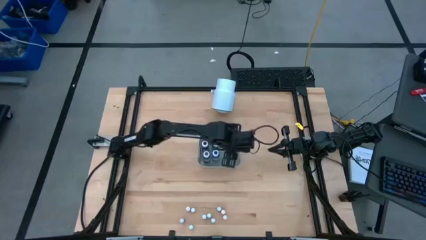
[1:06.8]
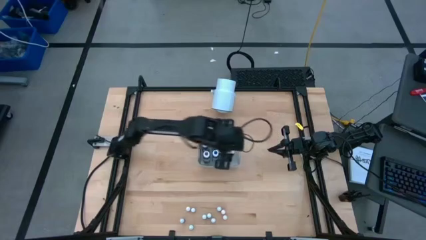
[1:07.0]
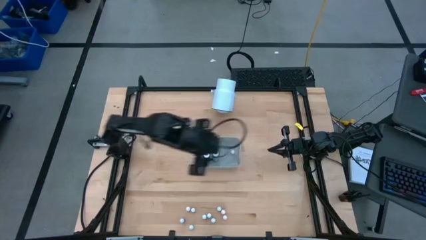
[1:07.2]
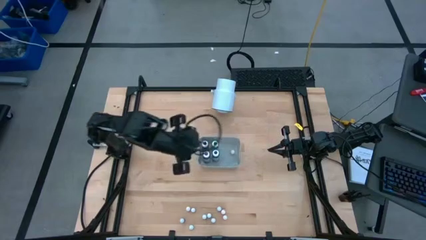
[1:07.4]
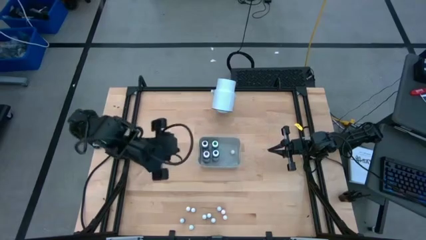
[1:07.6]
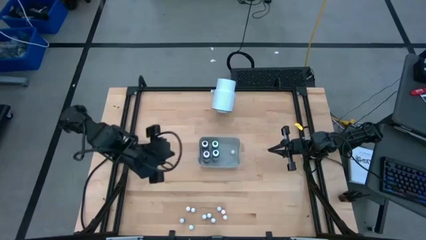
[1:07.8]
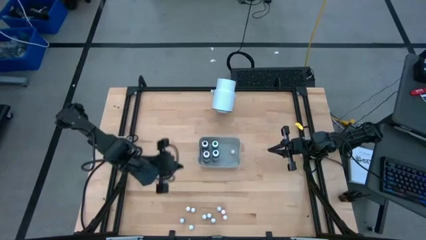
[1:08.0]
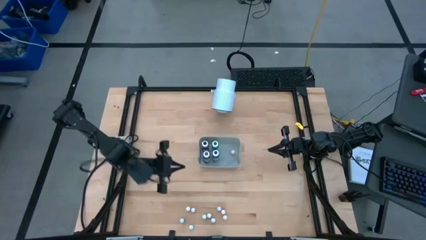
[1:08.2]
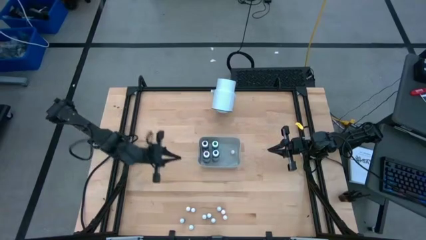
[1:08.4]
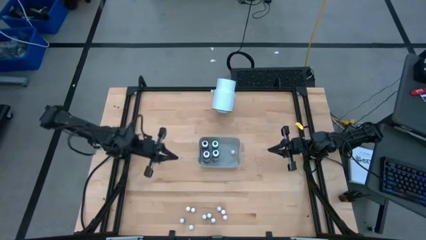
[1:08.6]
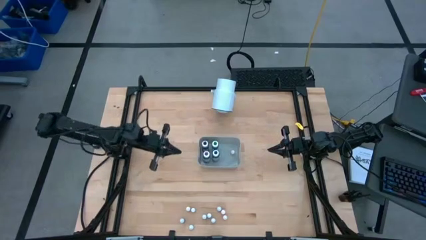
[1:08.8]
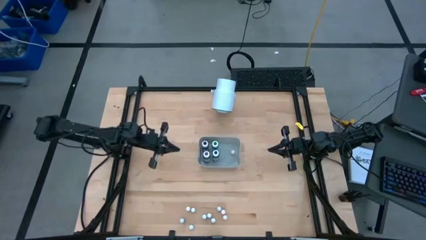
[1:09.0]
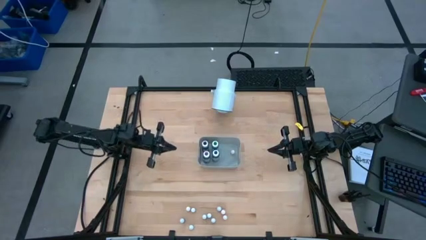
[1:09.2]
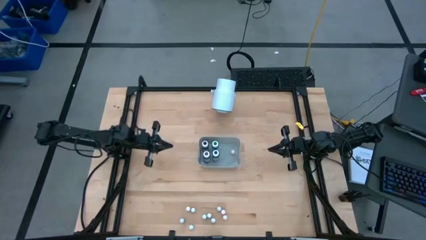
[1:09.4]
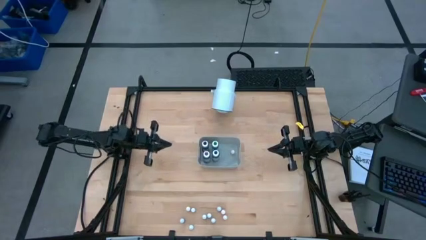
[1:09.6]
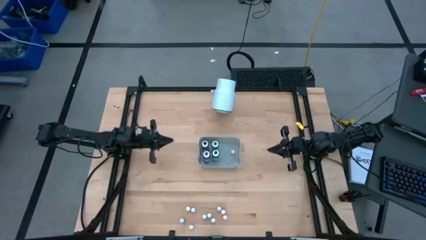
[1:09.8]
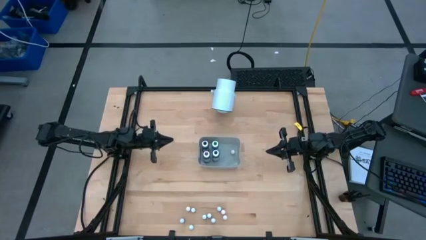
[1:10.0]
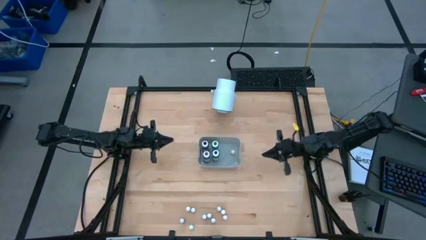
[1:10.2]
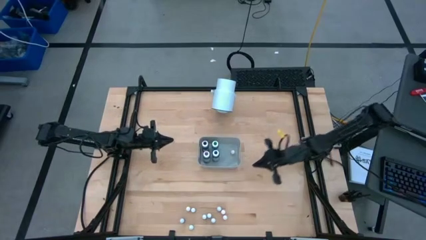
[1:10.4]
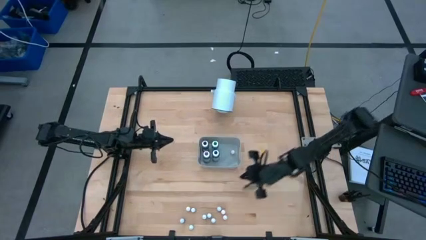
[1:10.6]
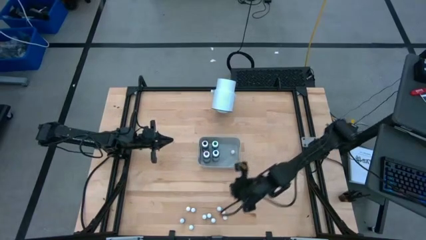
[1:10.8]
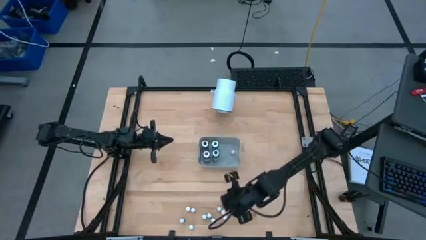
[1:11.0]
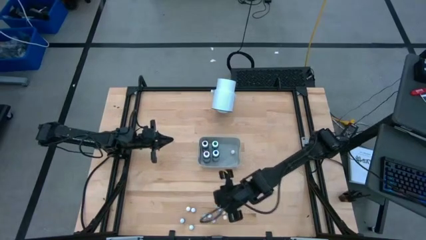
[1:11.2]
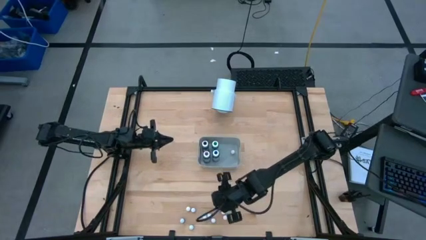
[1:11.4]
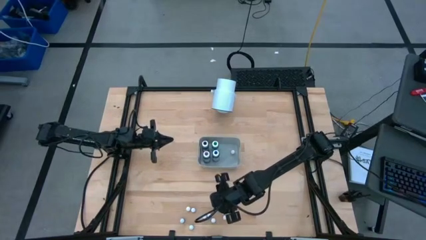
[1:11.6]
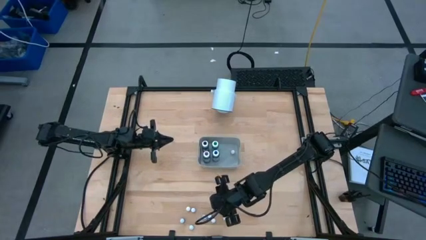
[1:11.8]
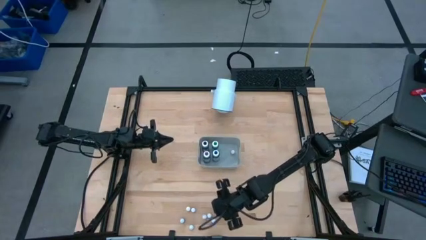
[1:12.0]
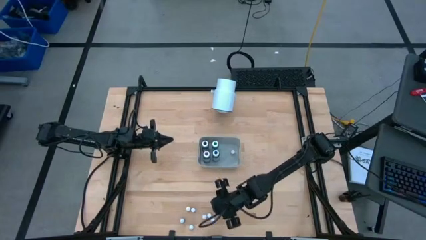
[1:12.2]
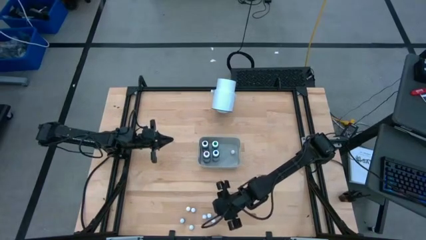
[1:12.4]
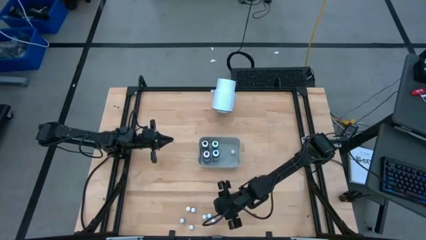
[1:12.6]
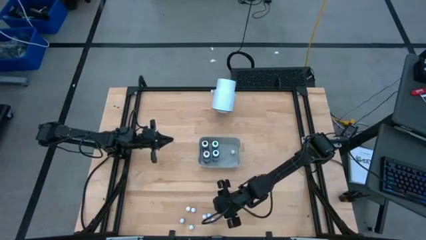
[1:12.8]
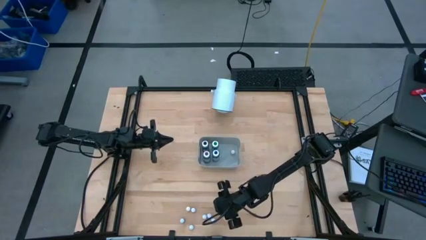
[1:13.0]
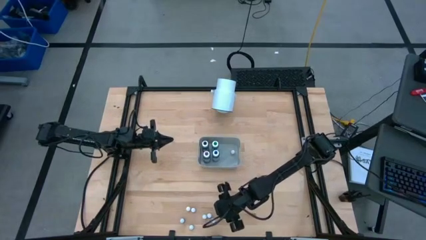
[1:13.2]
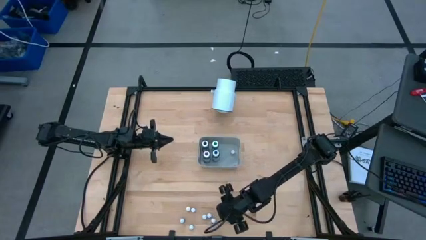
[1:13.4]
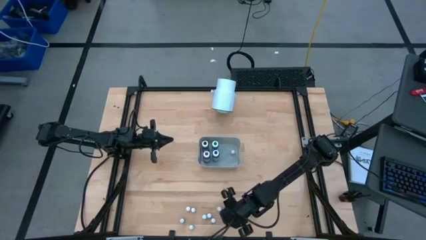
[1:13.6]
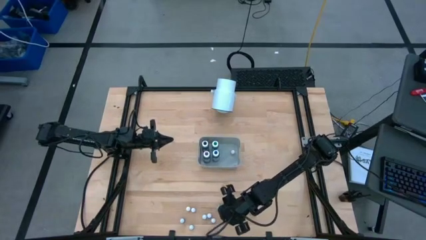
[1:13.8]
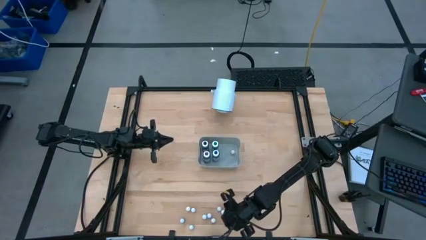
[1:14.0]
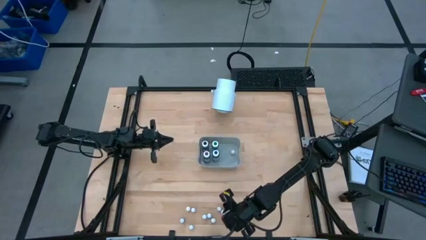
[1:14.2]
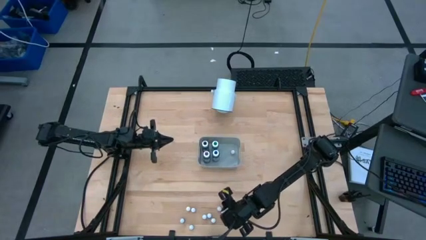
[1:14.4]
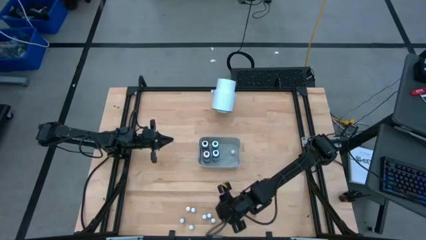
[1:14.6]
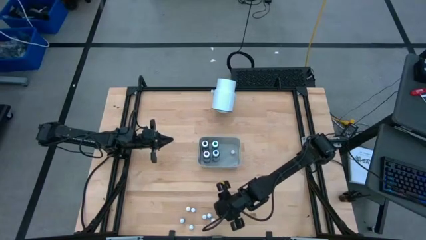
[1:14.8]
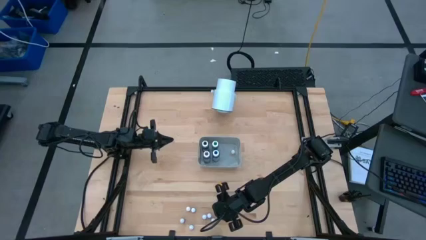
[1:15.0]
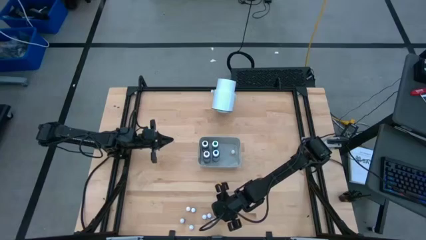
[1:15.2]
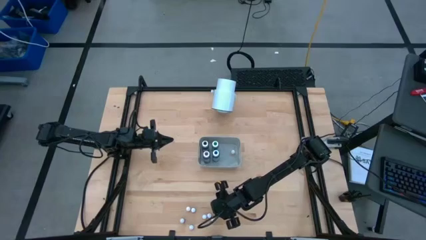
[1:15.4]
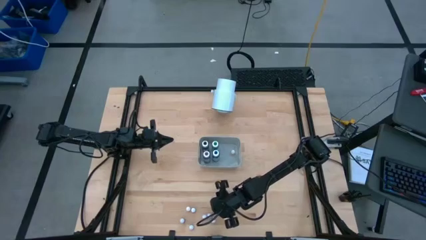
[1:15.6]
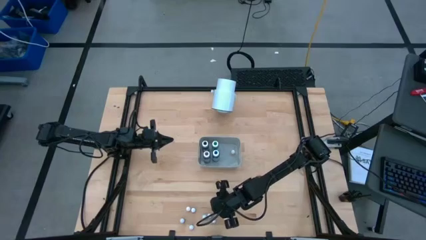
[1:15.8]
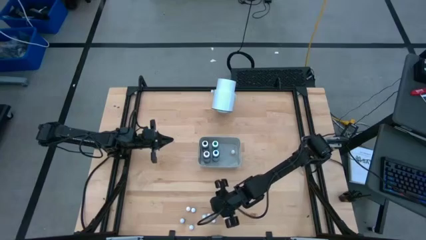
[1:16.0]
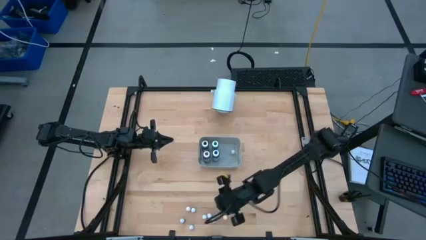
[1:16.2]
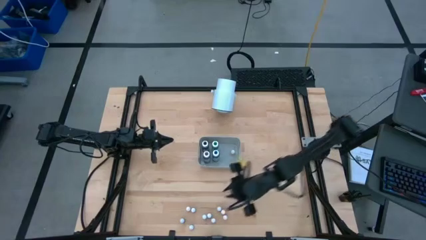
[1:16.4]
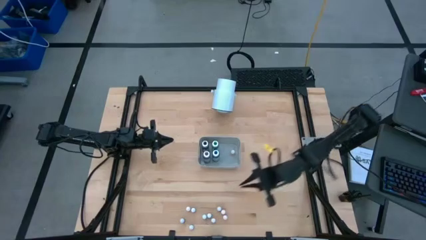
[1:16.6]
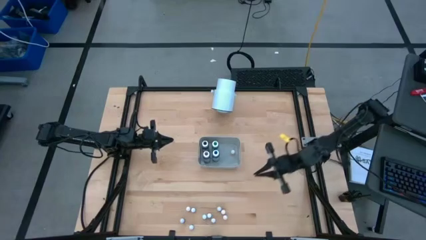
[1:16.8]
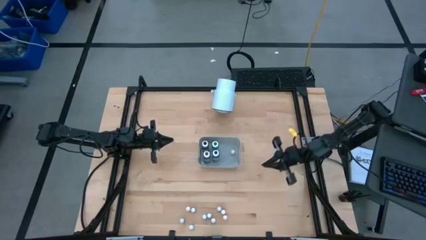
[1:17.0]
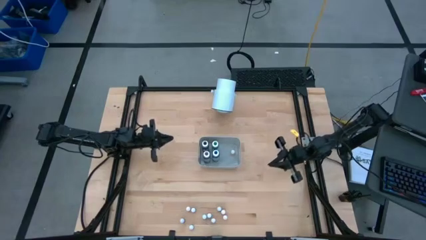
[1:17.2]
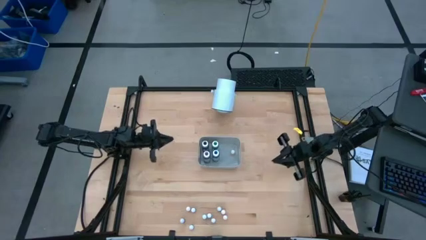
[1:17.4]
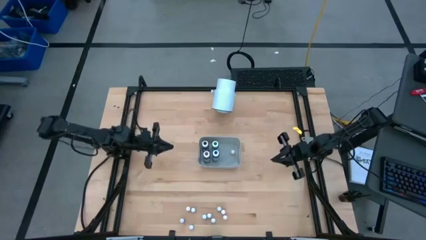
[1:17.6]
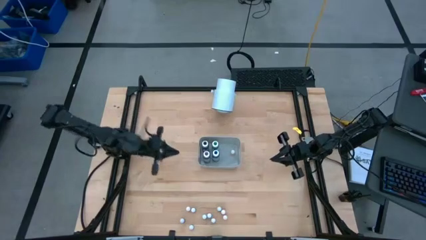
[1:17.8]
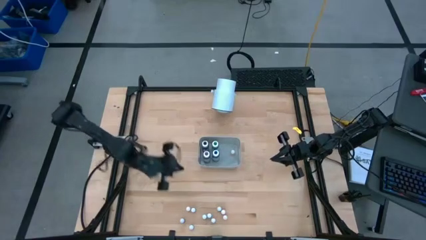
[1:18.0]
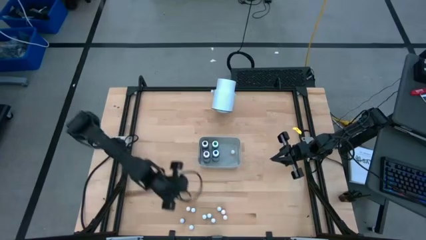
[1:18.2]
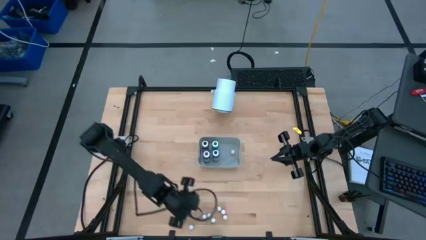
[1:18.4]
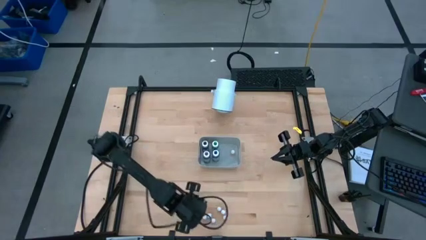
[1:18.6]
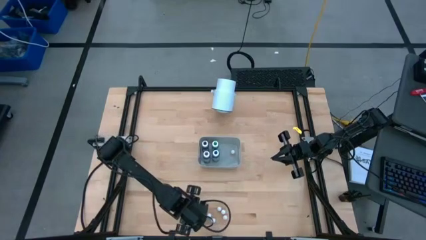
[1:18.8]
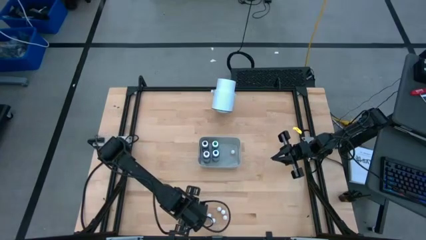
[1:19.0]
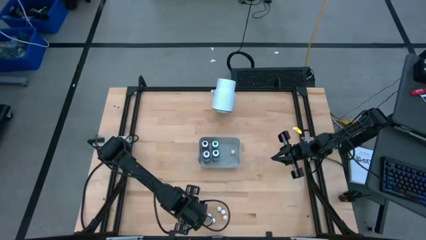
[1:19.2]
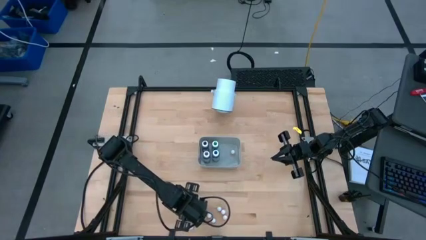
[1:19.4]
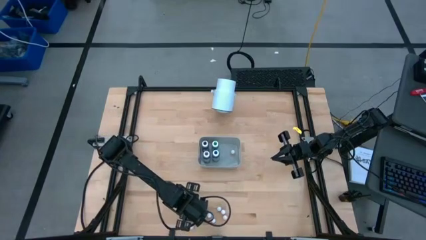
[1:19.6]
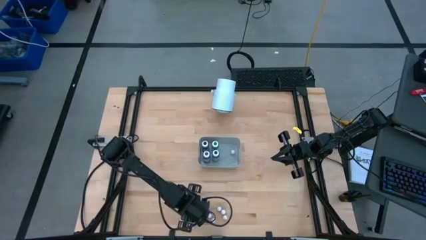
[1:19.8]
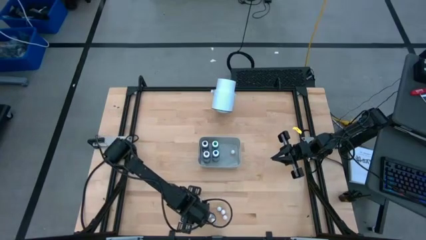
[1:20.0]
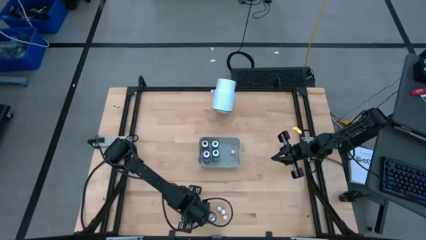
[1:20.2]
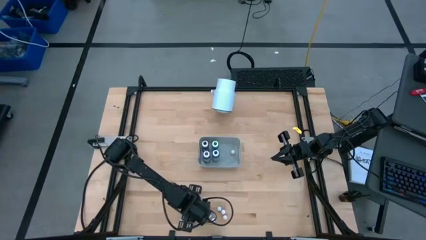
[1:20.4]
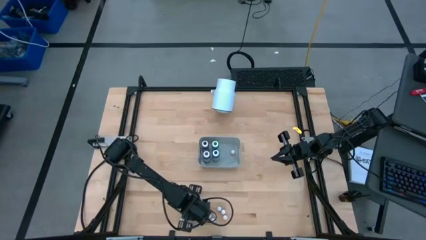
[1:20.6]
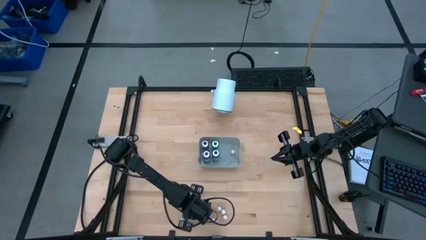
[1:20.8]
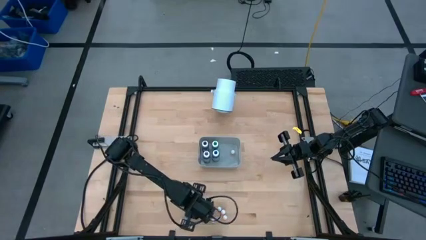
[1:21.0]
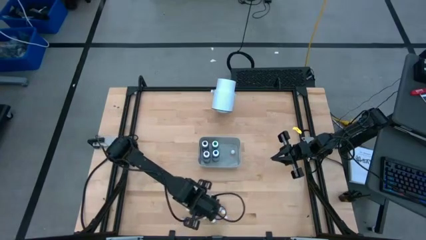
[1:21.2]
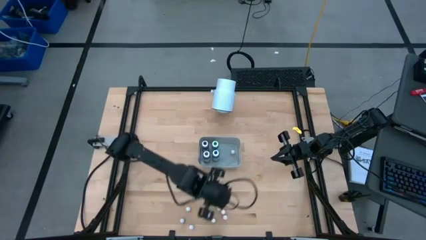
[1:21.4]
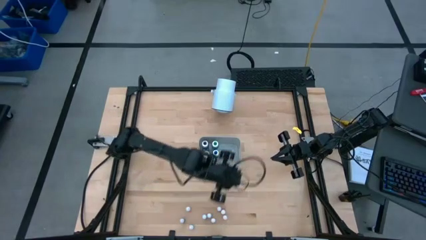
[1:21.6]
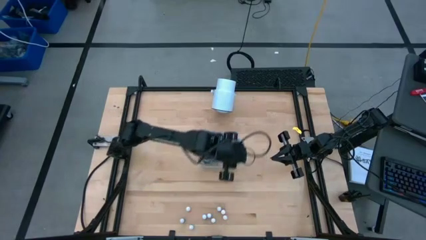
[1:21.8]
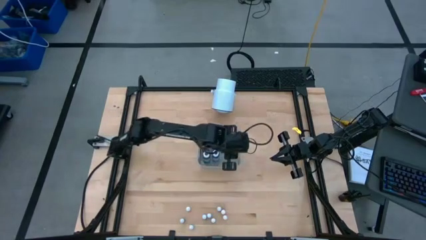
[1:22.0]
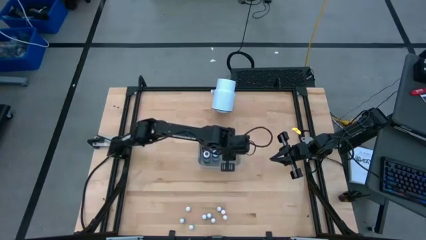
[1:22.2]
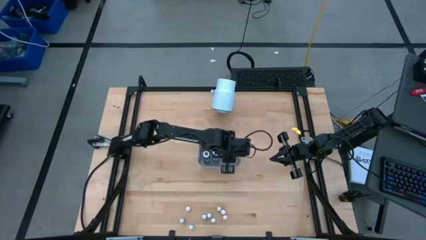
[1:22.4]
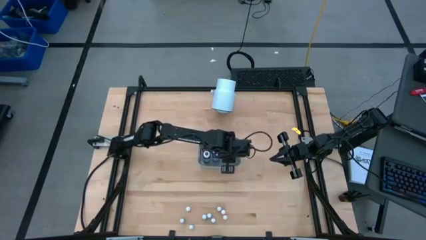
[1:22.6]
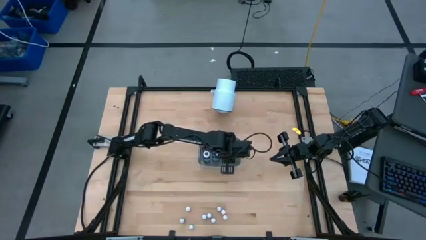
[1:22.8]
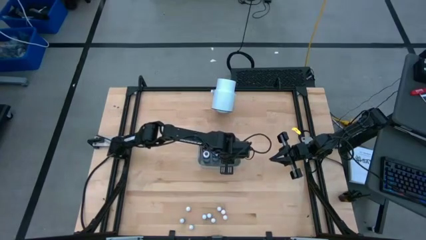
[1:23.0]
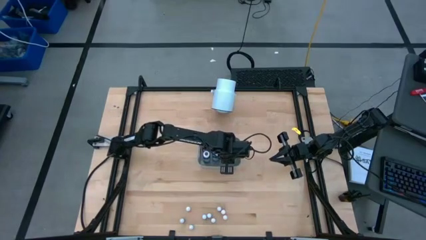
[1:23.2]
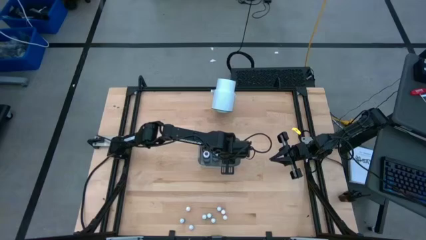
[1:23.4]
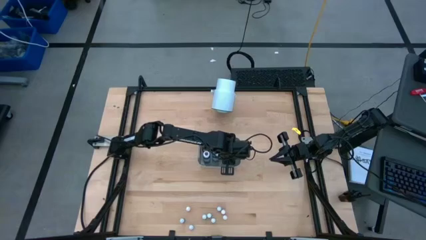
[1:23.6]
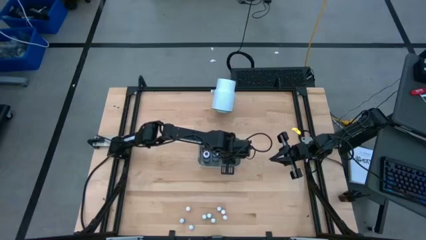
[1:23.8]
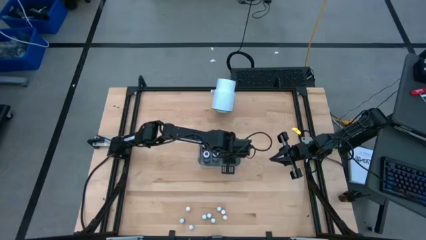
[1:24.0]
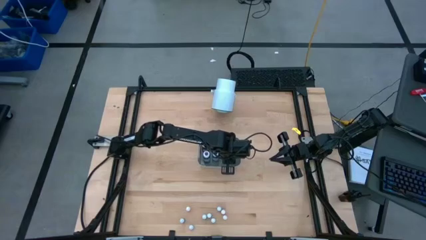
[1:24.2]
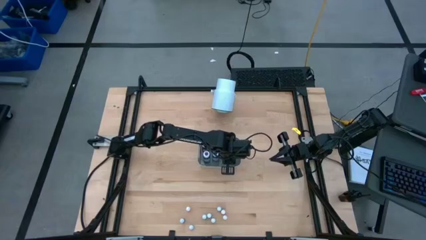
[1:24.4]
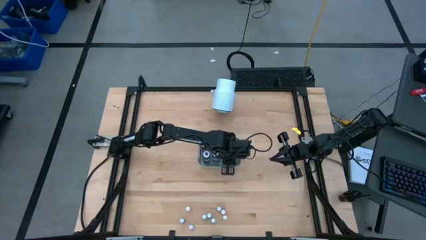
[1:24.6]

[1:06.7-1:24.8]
Task: Pick & Place food coloring
Put the small red food coloring bottle into the gray bin
